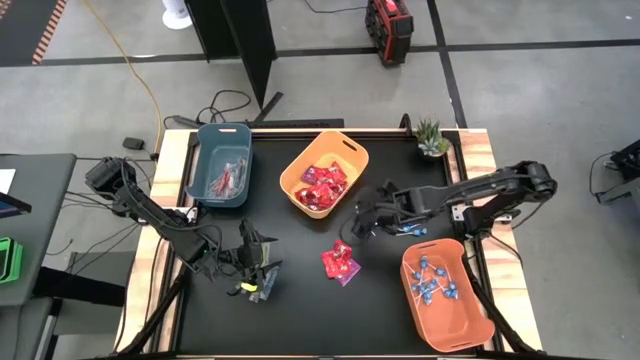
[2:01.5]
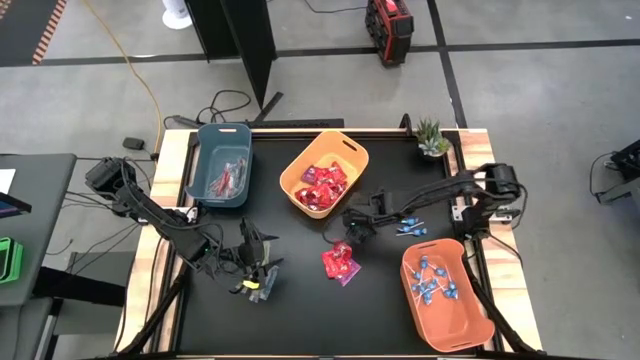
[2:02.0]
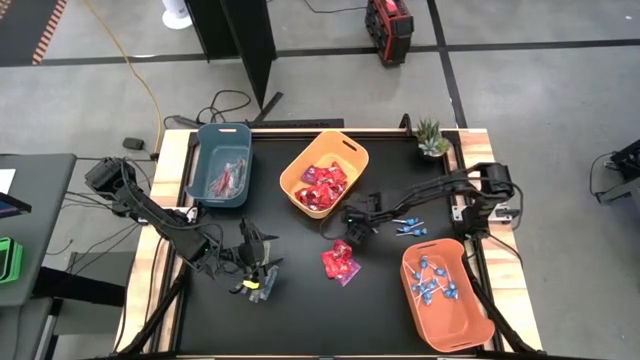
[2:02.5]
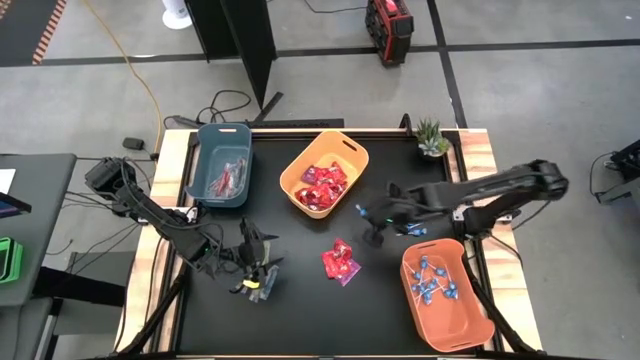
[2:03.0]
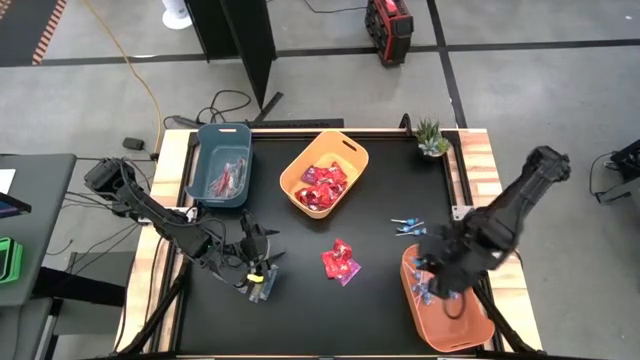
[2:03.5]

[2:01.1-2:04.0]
Task: Sort candy
Put the blue lollipop into the orange bin

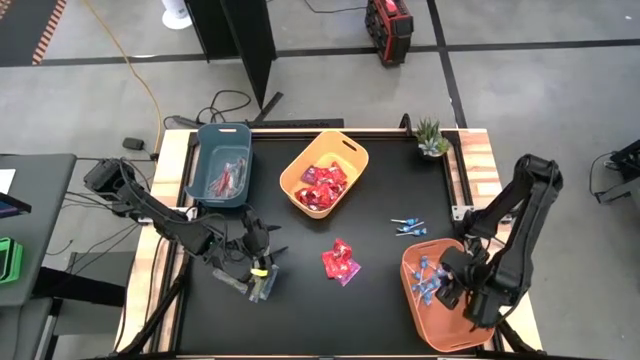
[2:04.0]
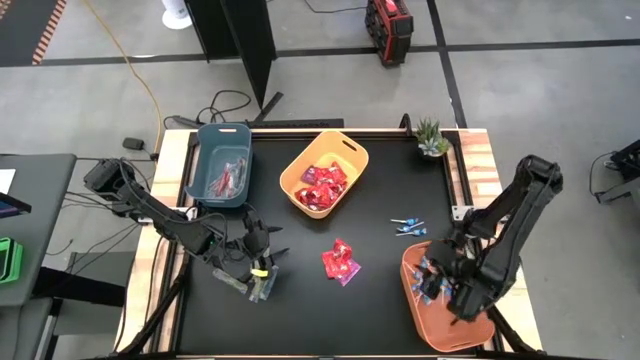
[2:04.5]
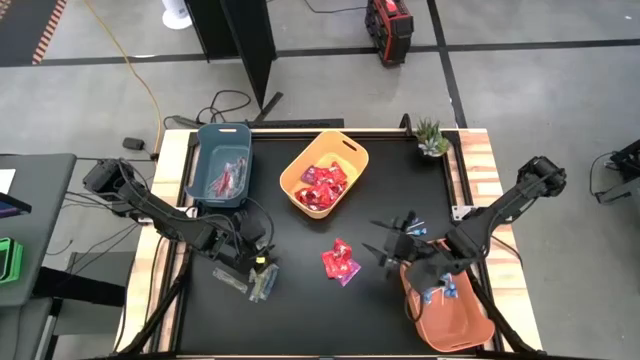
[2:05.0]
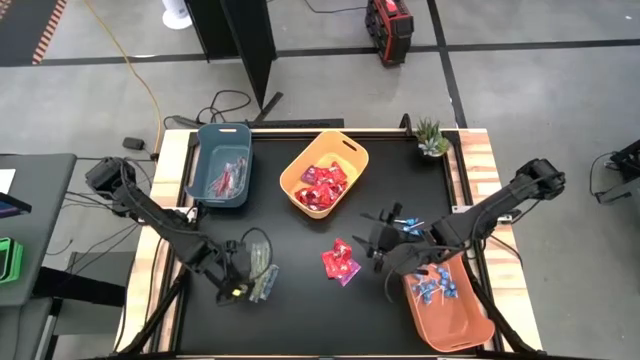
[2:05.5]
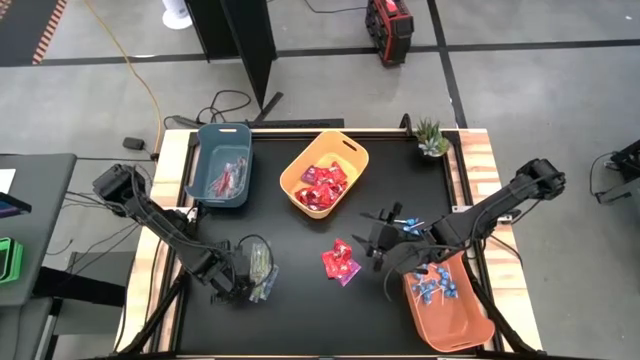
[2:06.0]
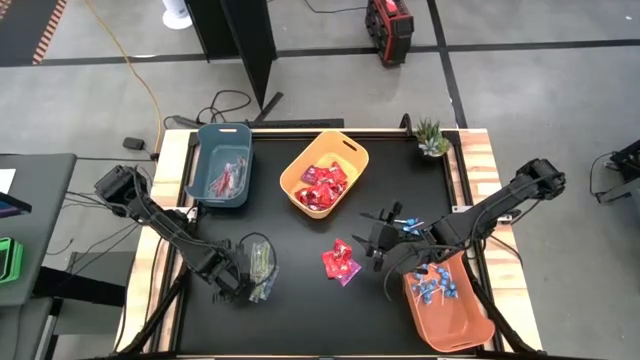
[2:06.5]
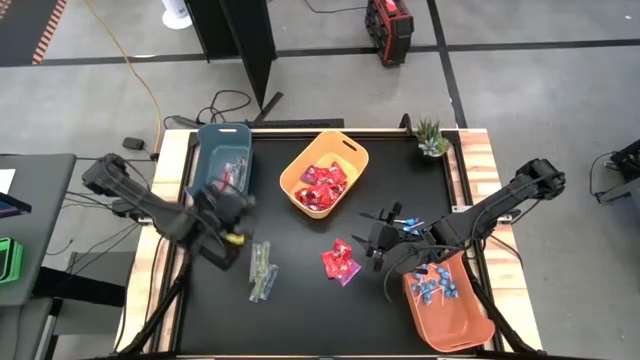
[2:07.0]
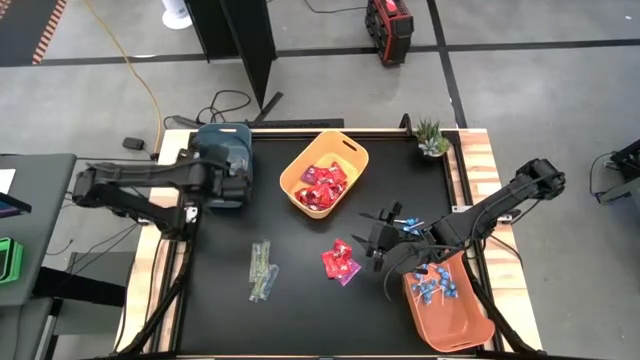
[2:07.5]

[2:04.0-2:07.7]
Put the green gummy into the blue bin

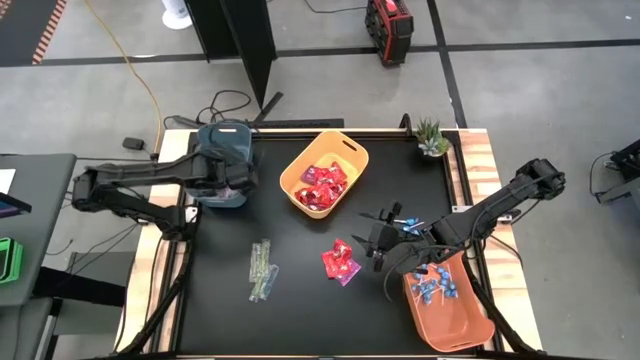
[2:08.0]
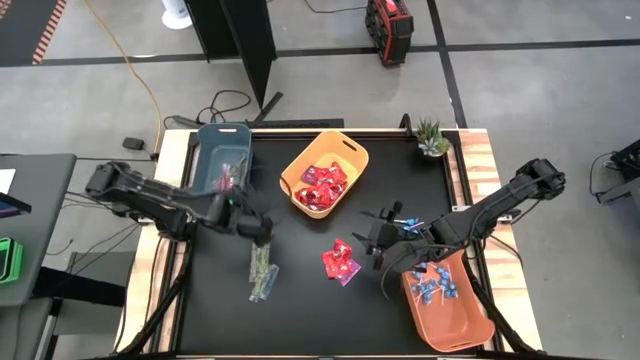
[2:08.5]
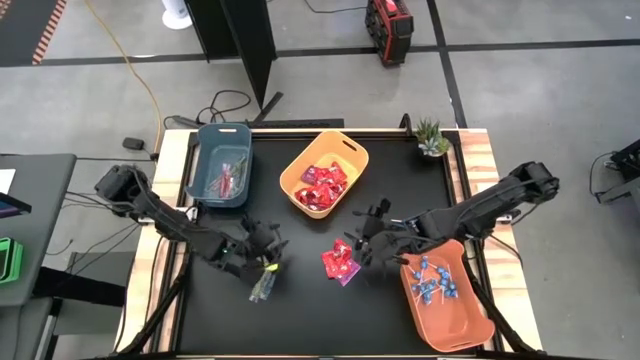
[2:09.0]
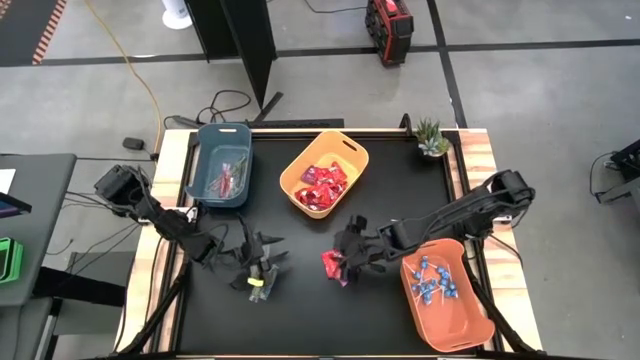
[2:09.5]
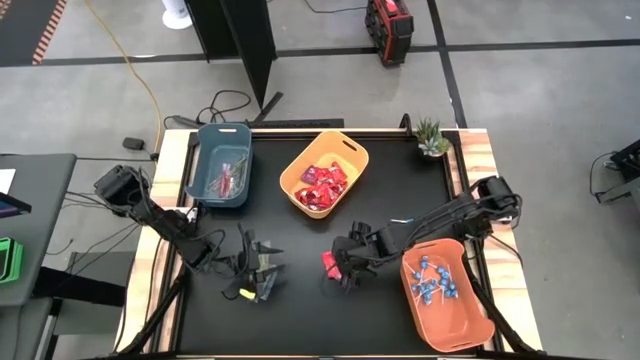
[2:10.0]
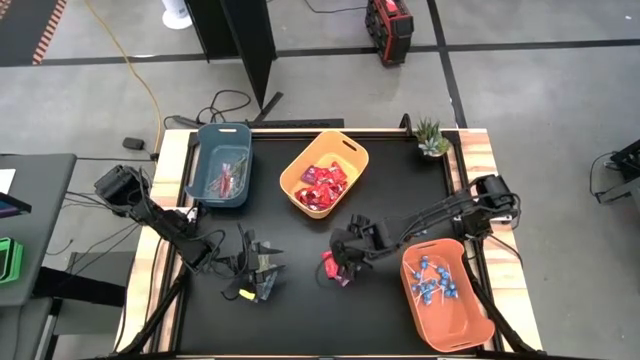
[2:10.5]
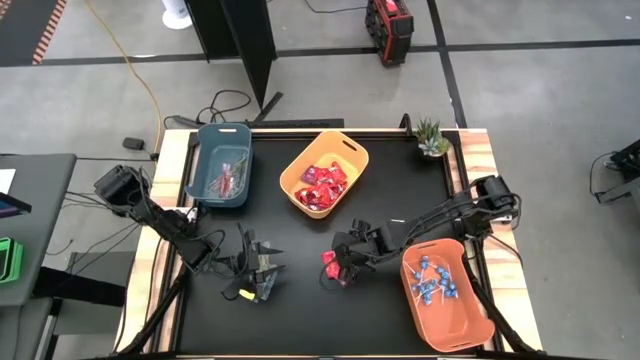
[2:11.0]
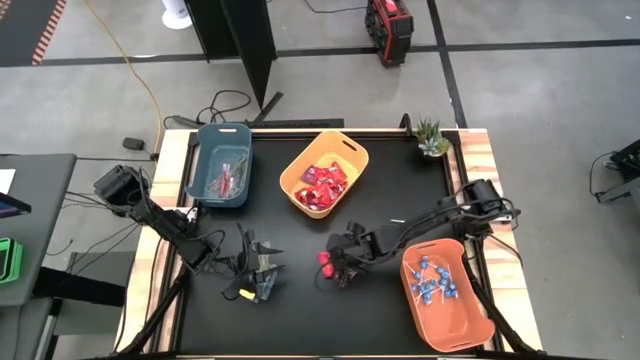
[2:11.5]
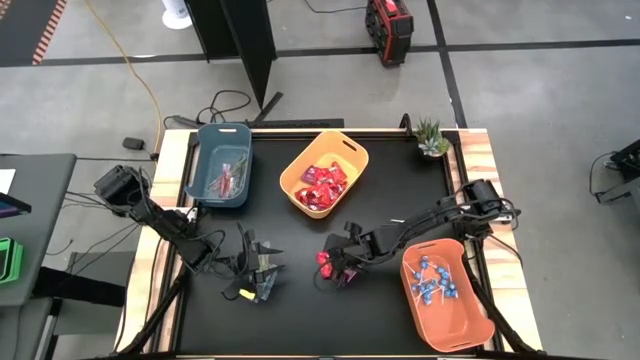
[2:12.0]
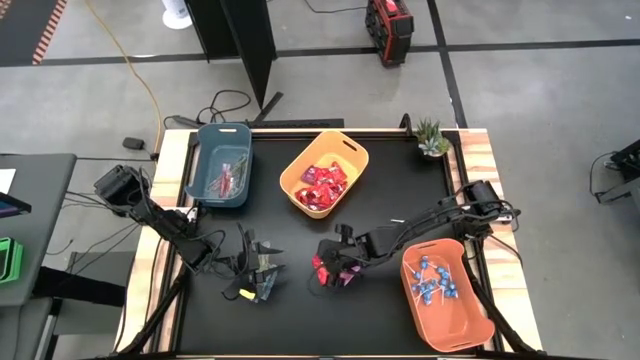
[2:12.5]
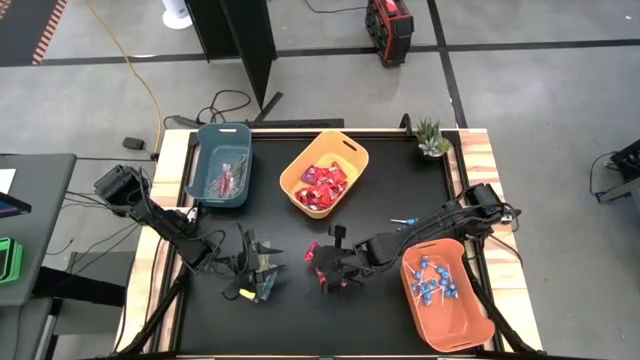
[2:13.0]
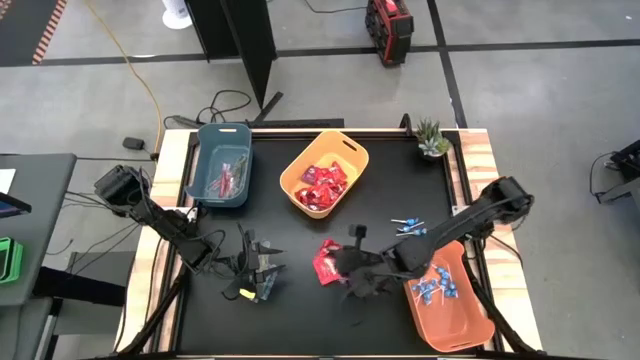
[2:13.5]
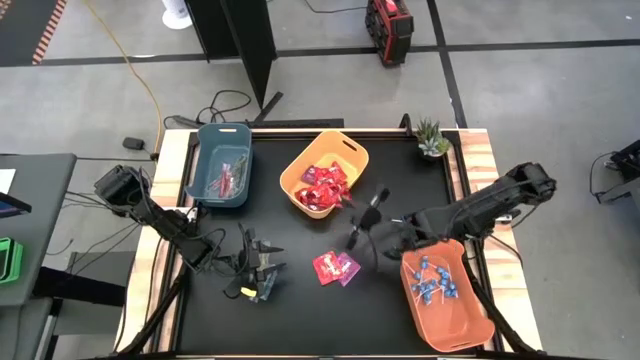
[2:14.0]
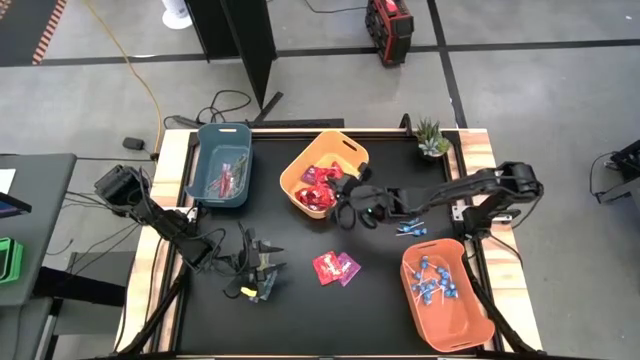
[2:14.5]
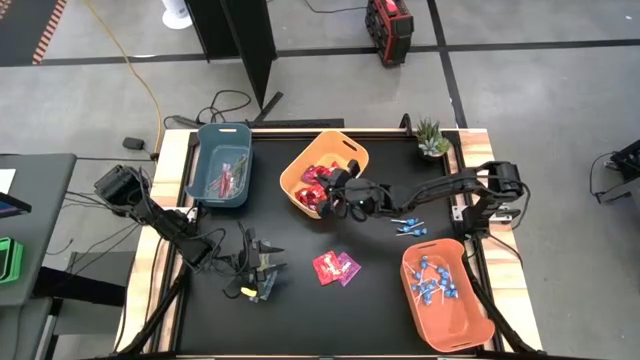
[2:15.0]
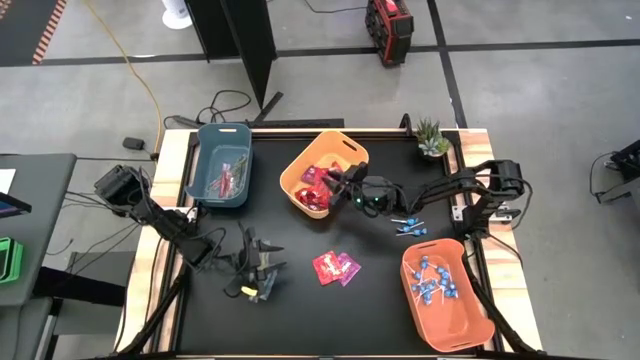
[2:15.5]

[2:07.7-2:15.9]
Put the red candy into the yellow bin

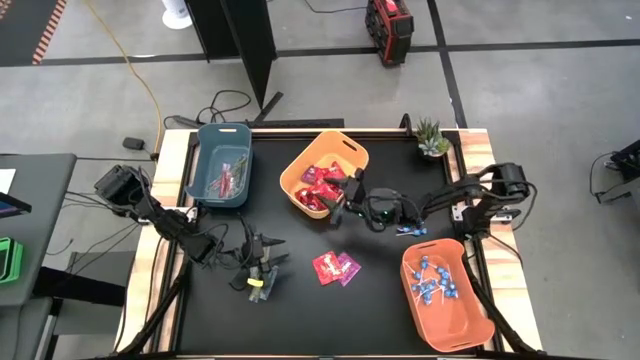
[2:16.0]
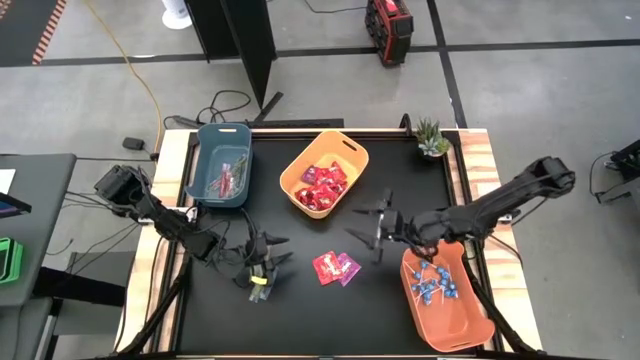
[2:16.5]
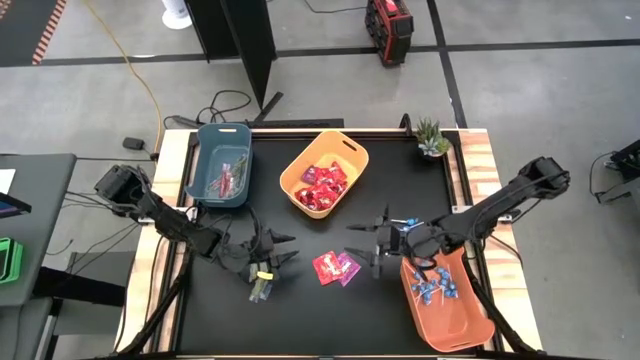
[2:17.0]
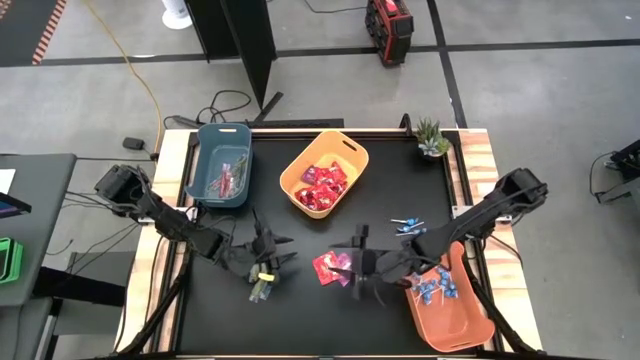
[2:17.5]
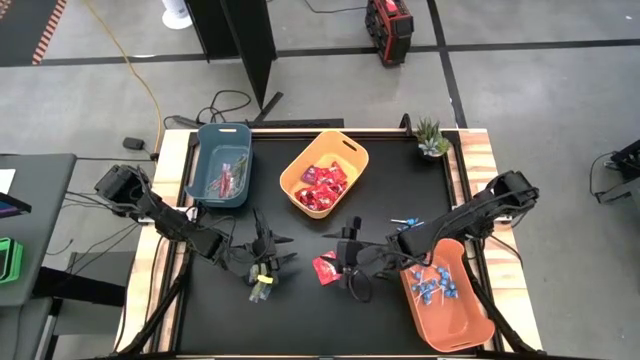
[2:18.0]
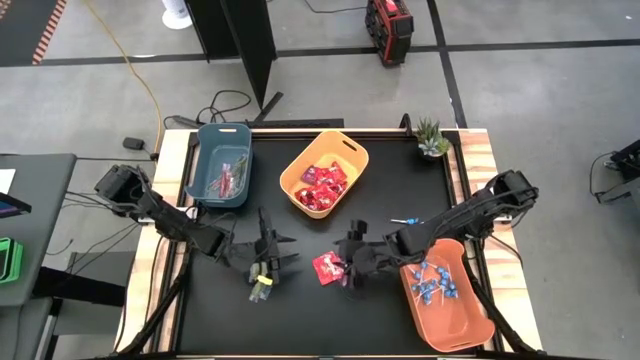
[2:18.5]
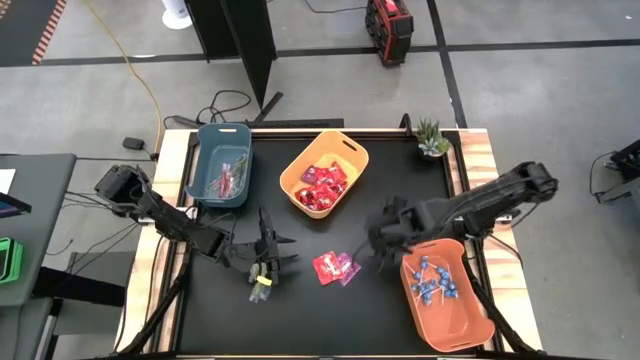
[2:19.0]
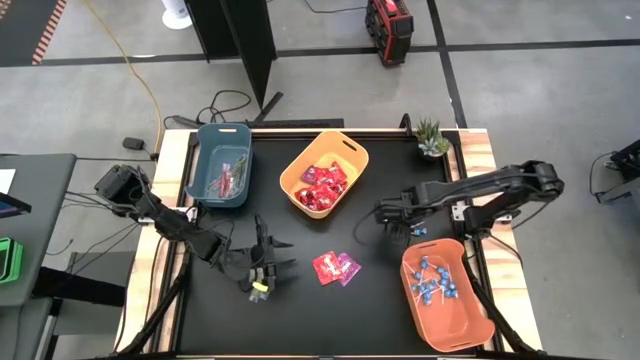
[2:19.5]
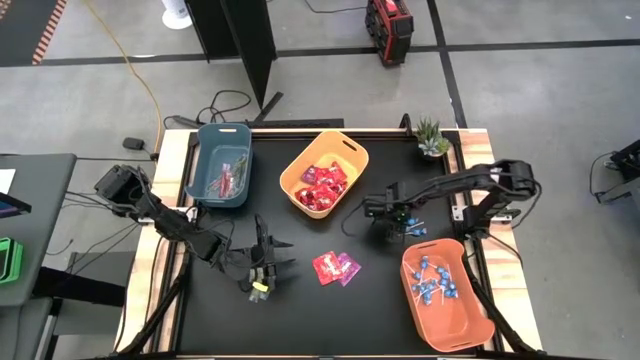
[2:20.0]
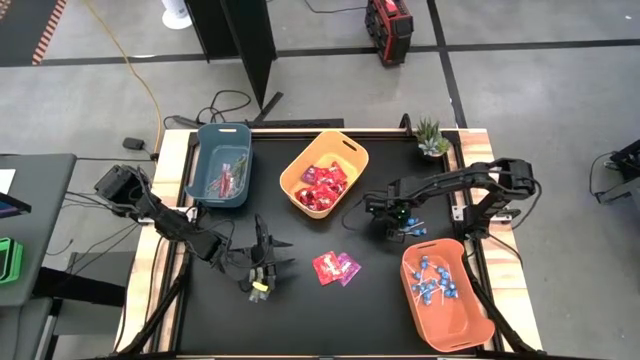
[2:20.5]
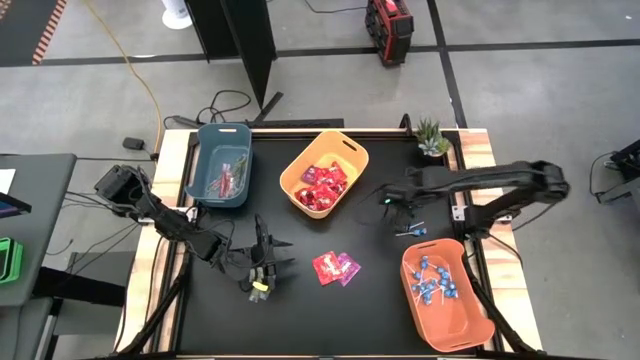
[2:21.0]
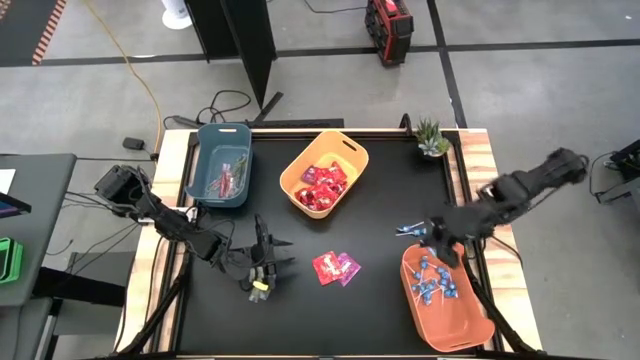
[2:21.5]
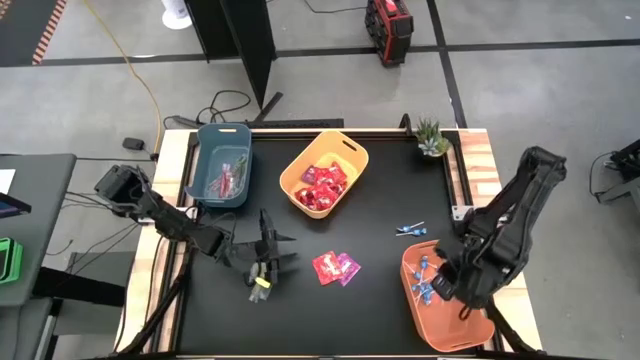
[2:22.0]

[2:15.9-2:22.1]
Put the blue lollipop into the orange bin

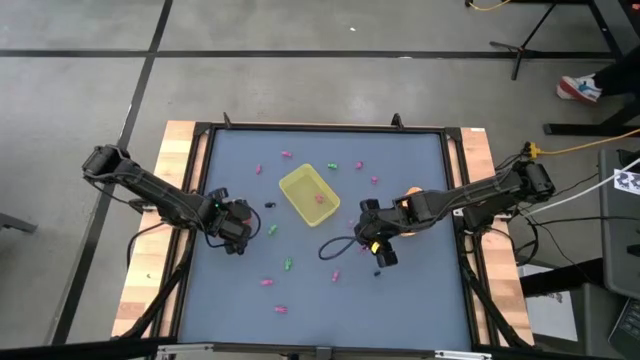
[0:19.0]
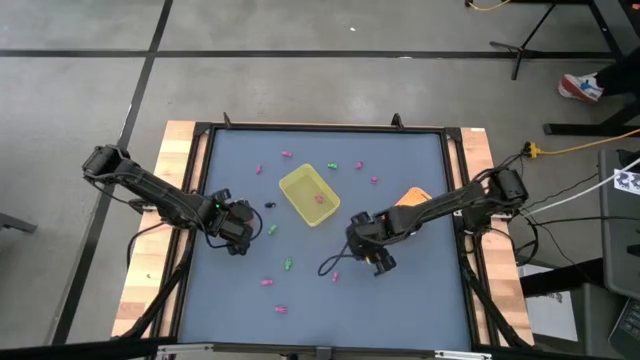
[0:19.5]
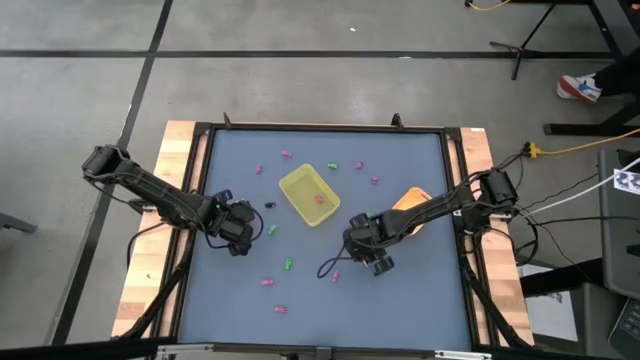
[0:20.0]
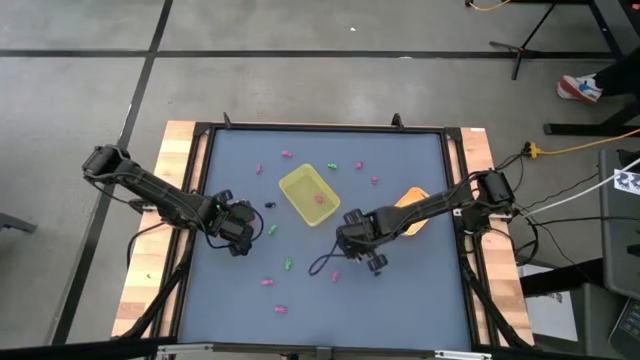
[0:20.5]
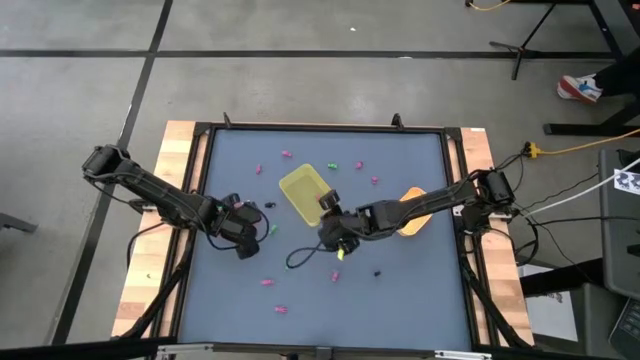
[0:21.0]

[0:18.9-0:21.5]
Task: Sort Halloween decoration
Put the pink skeleton toy into the yellow bin
